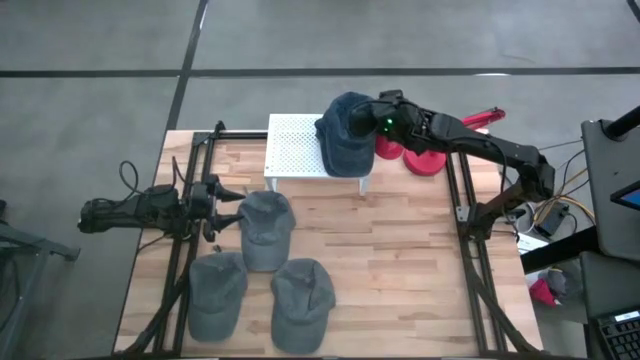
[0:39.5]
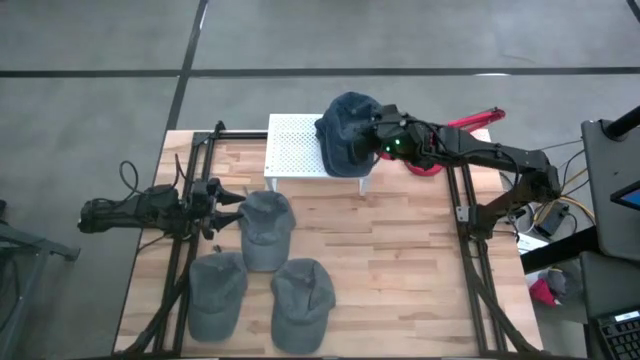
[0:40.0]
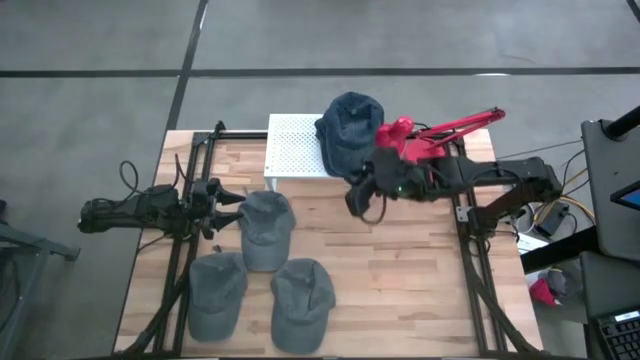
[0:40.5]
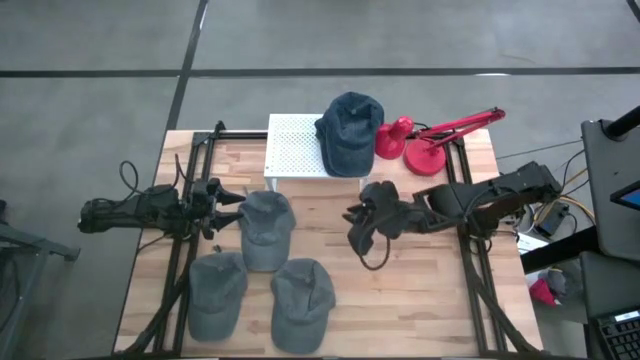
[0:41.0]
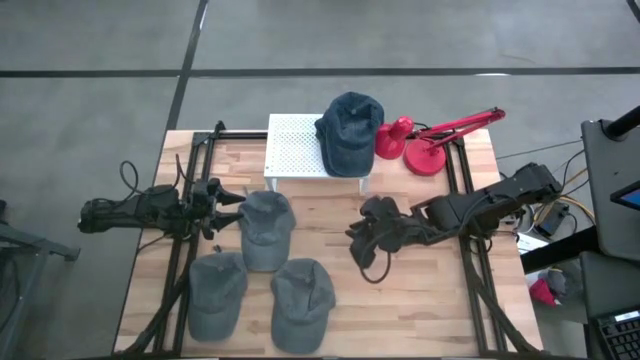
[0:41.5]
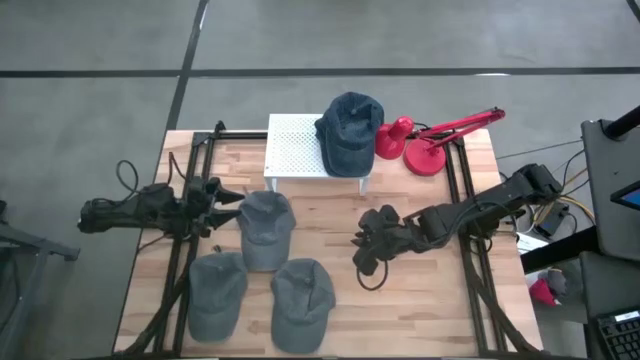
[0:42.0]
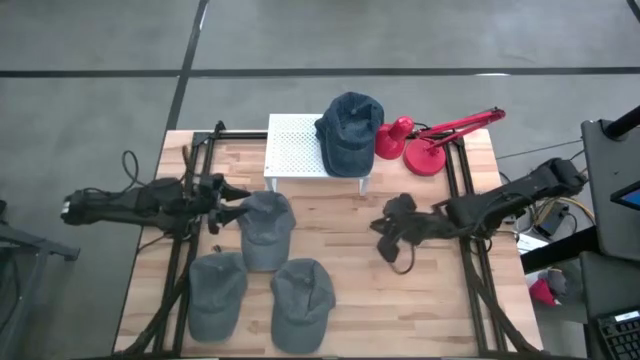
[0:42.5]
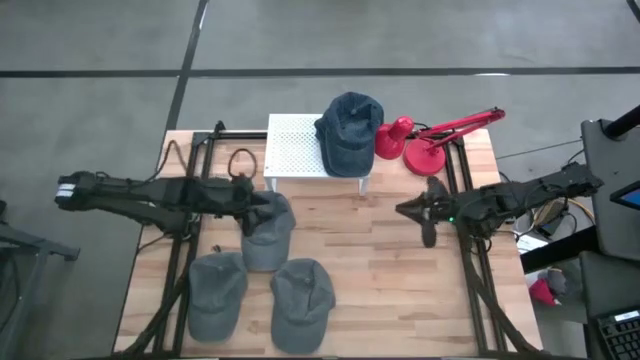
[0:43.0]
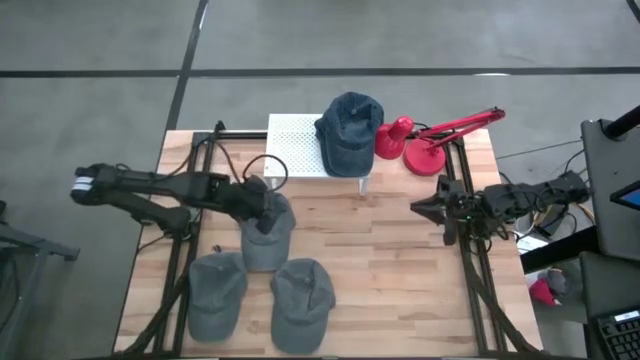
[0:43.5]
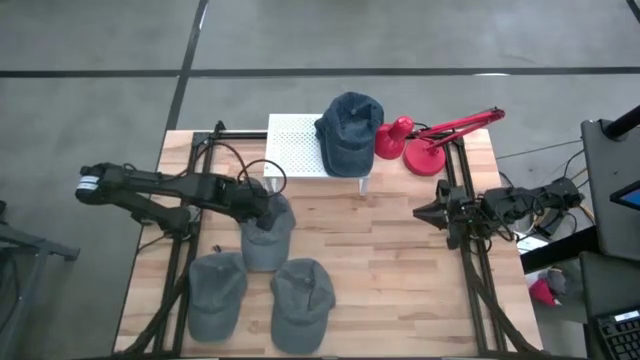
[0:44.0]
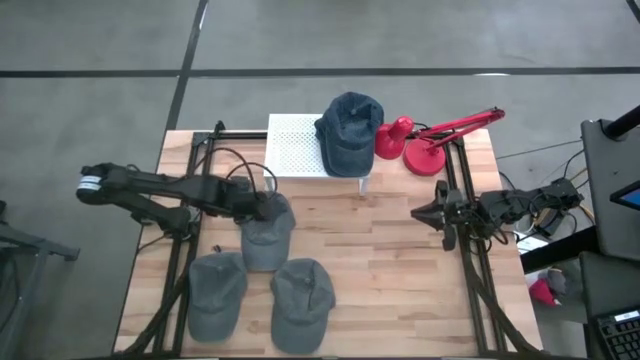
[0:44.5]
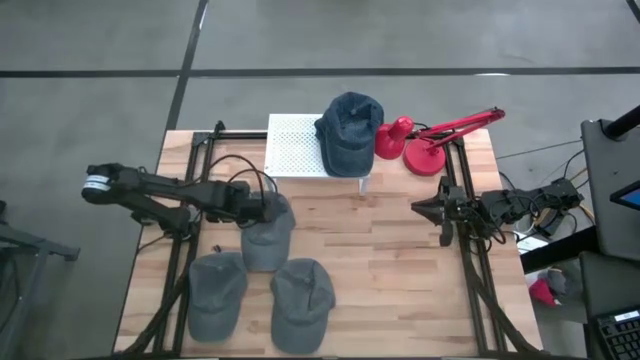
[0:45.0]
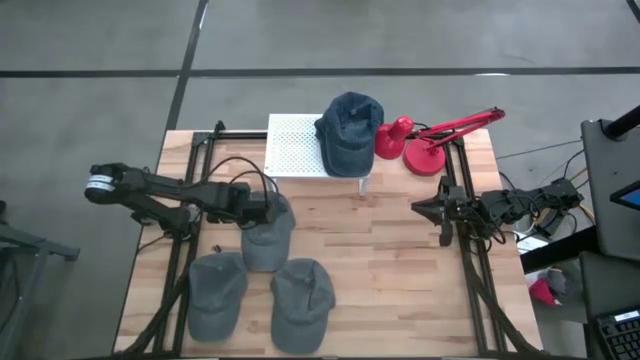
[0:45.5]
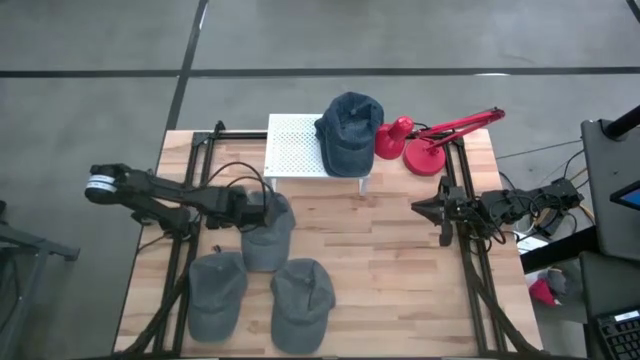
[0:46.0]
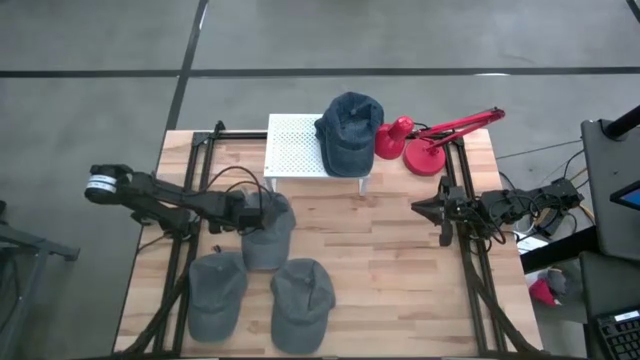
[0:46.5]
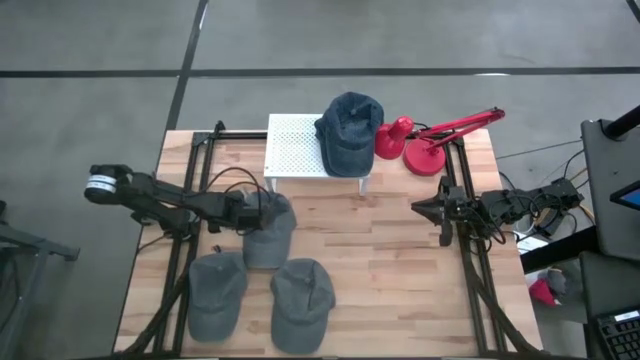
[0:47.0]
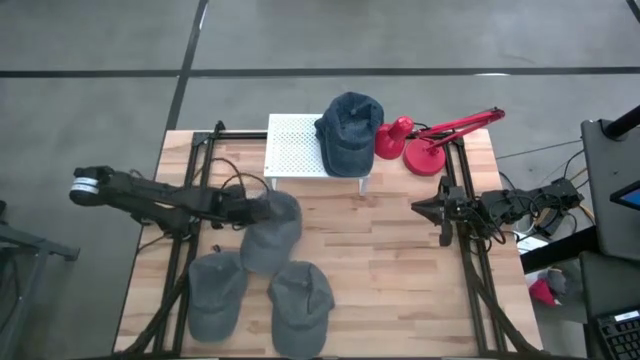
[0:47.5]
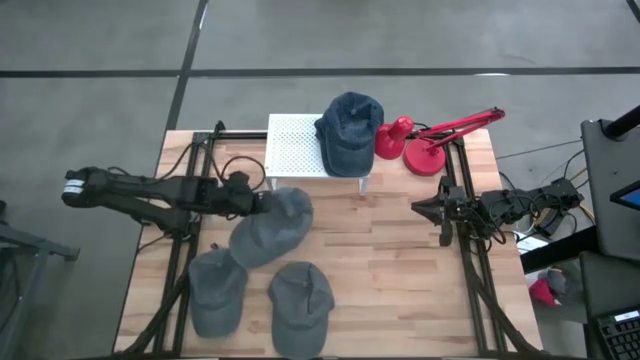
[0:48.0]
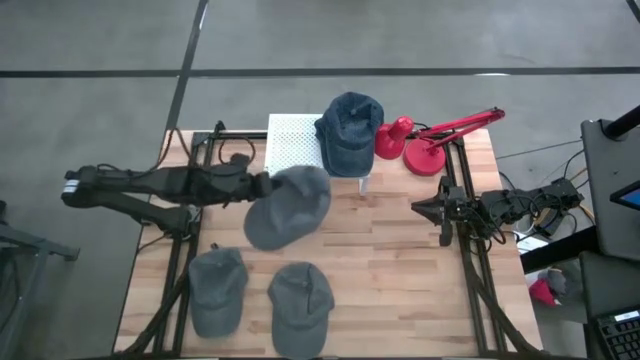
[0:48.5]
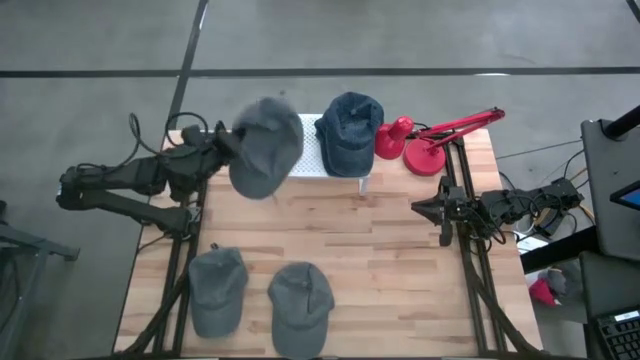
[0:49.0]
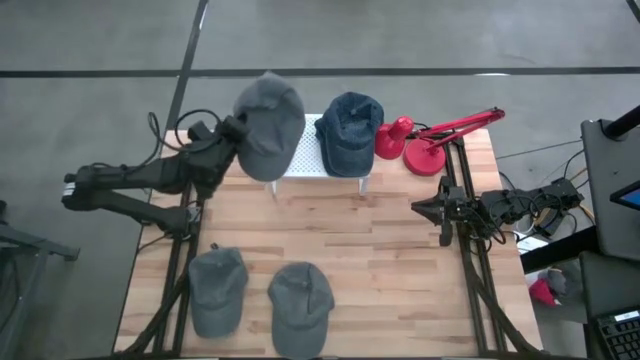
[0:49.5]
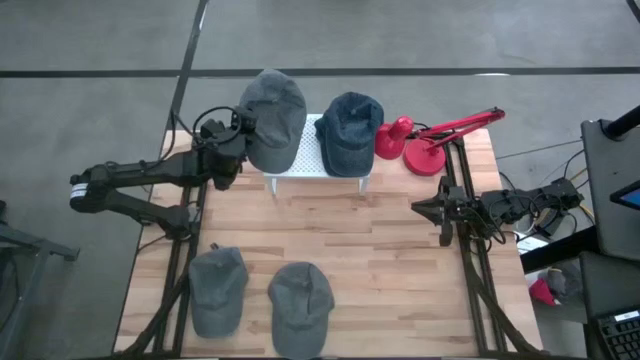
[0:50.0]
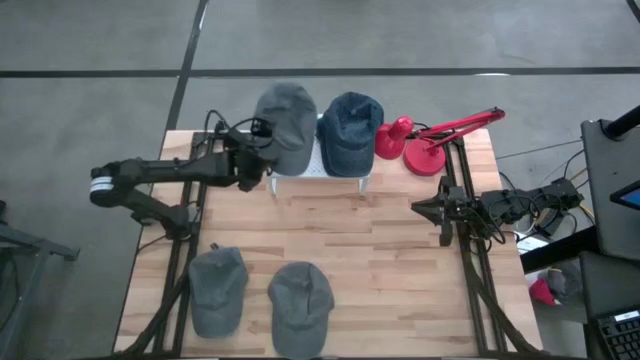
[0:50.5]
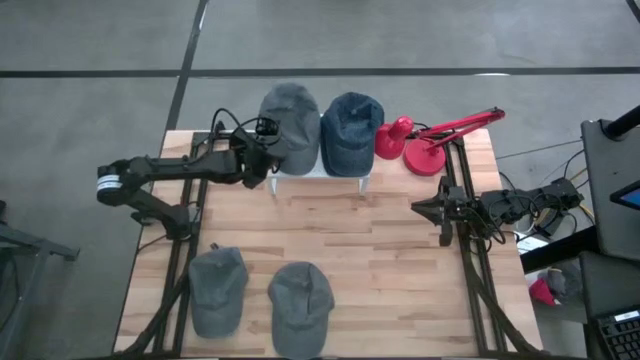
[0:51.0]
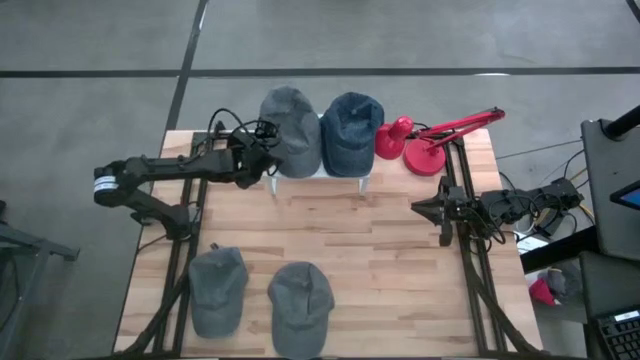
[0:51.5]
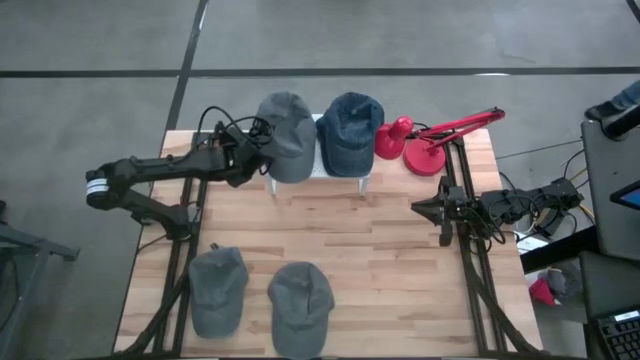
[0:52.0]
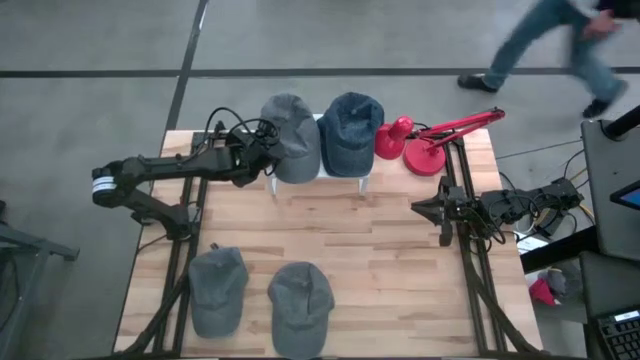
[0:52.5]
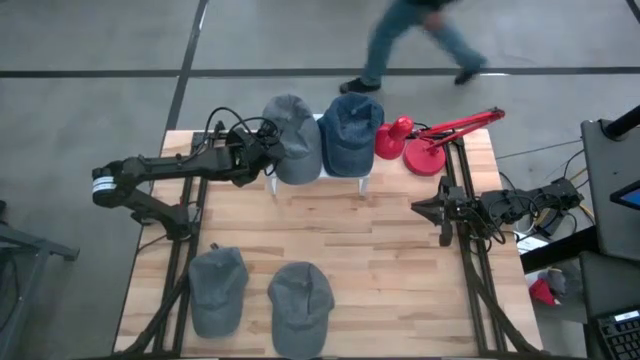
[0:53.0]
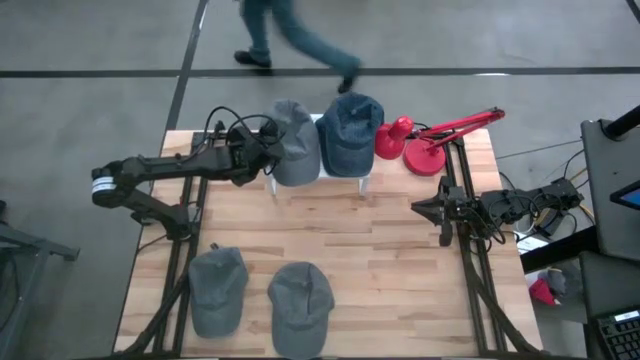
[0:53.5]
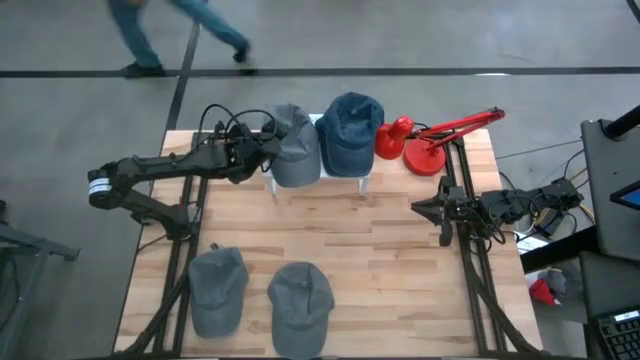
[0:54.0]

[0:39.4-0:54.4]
Task: Pick & Place hat
Put the top gray cap on the shelf

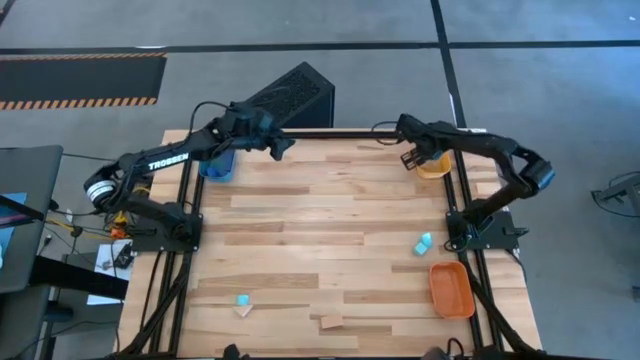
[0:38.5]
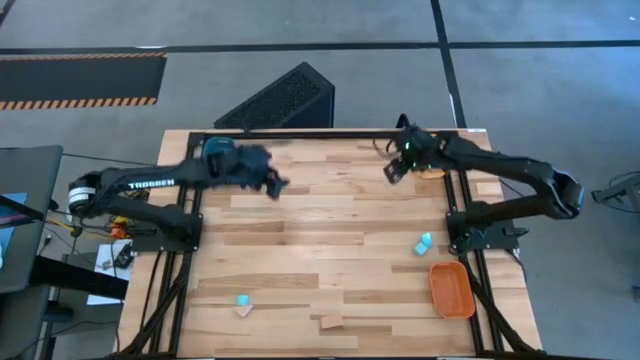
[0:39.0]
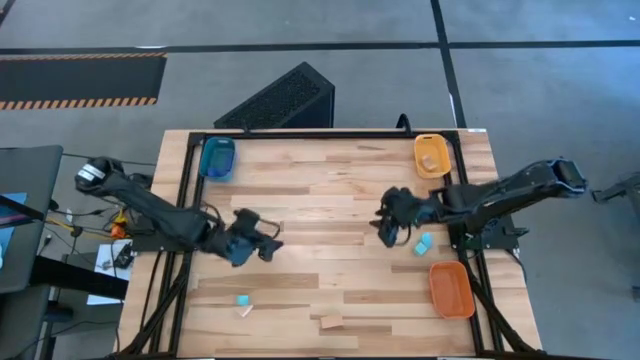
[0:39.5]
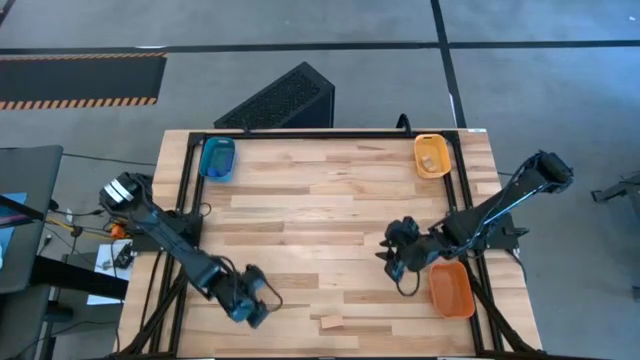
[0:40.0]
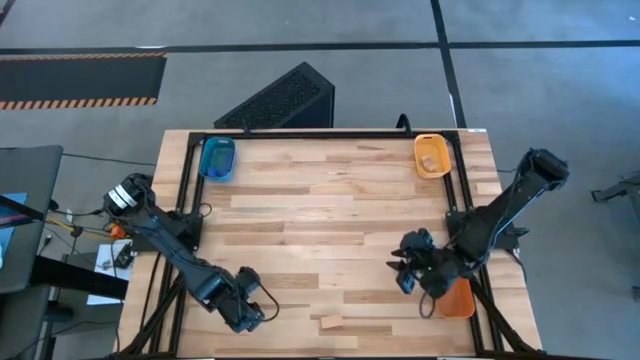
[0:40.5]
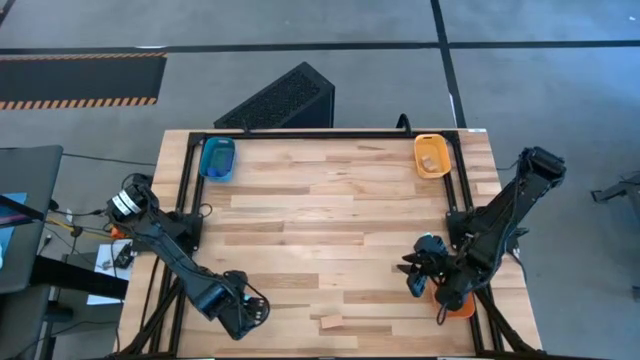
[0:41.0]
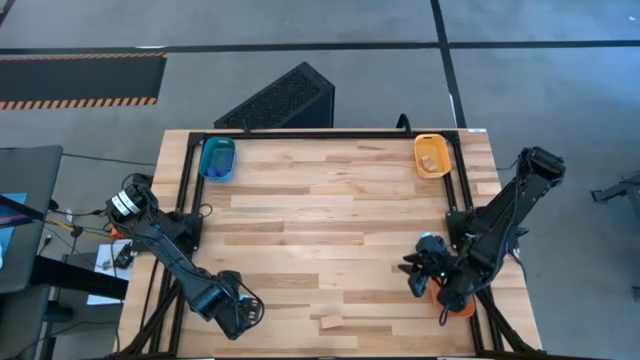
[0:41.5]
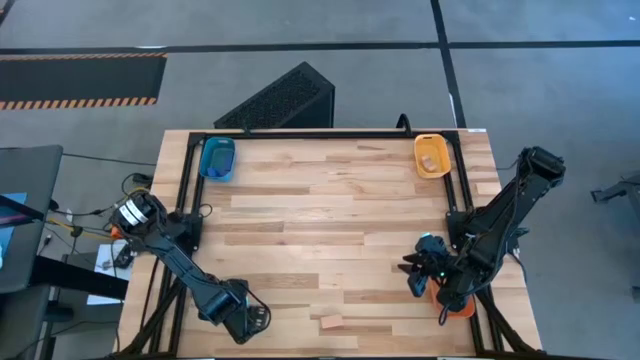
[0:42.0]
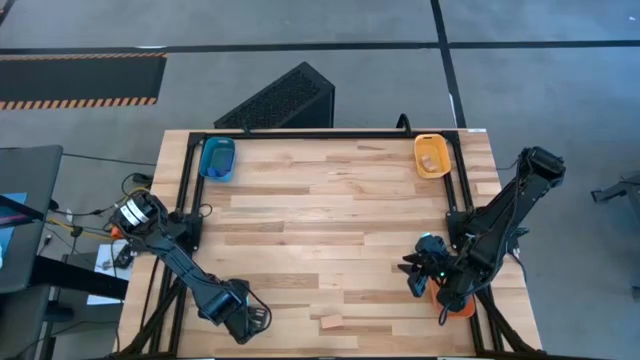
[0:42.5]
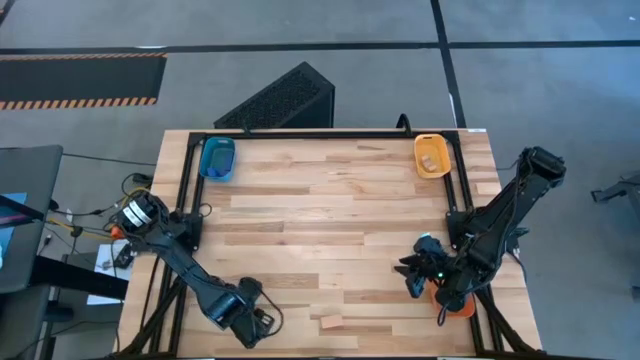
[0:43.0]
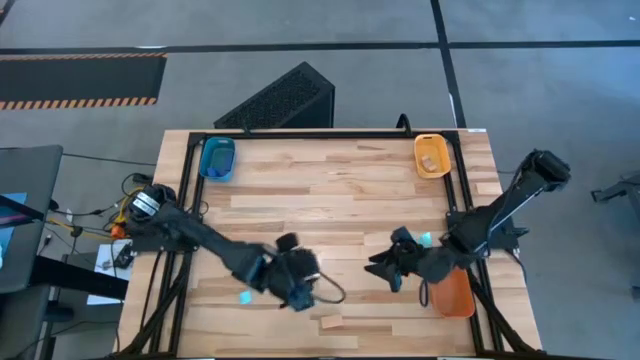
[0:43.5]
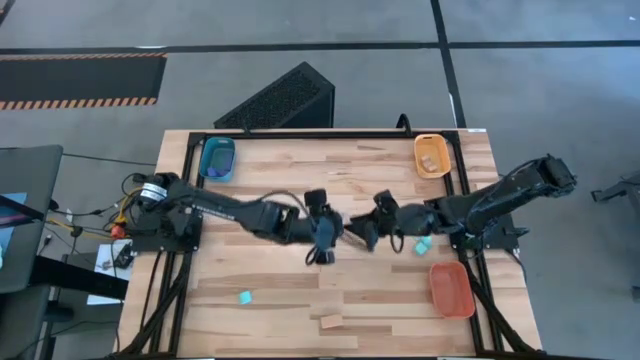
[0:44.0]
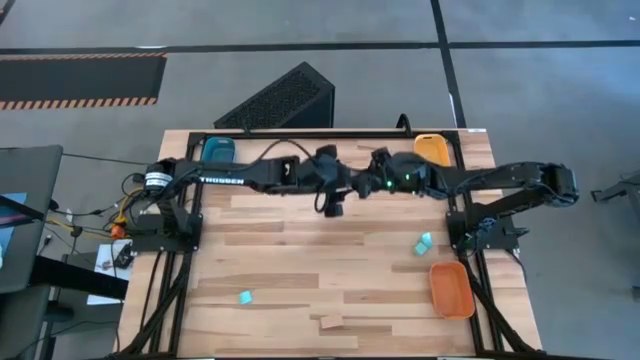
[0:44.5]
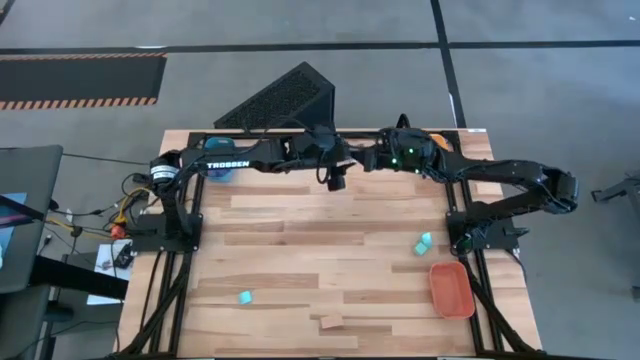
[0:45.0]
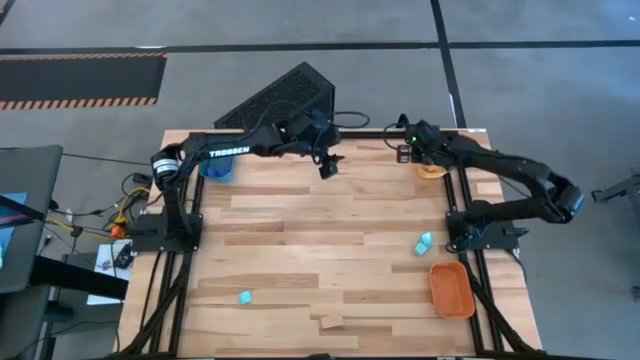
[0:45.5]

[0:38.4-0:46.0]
Task: Sort & place blocks by color
Put the left brown block into the yellow bin
